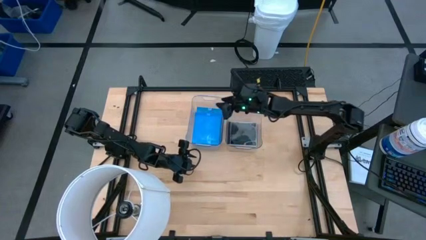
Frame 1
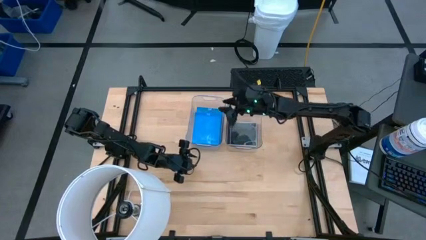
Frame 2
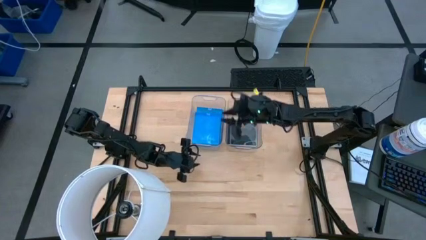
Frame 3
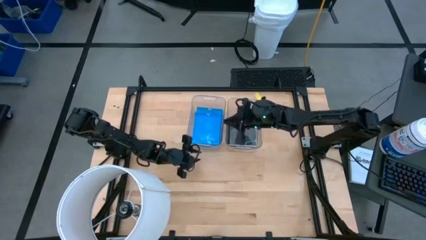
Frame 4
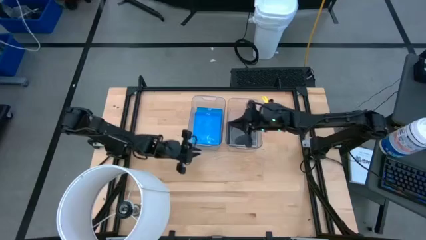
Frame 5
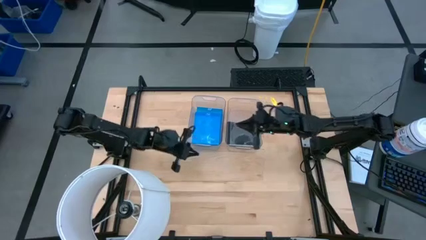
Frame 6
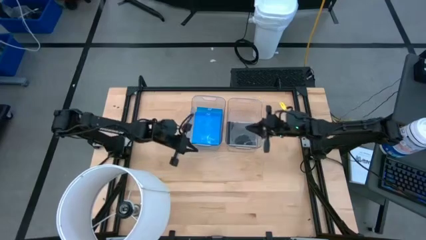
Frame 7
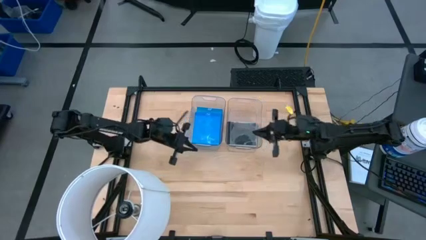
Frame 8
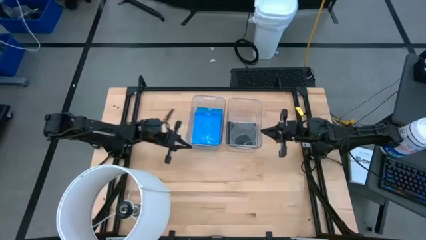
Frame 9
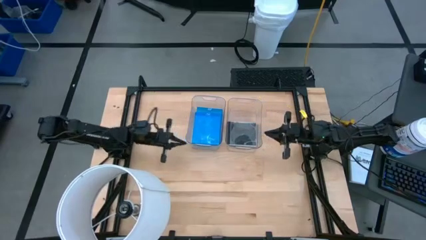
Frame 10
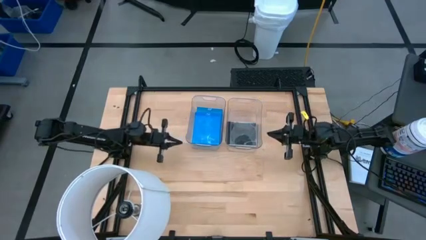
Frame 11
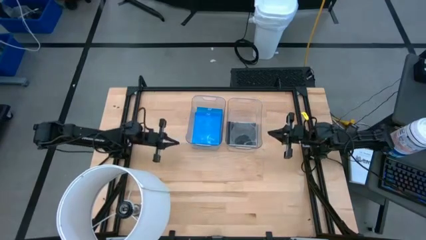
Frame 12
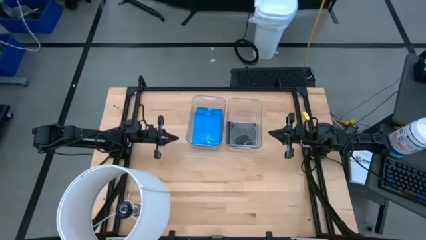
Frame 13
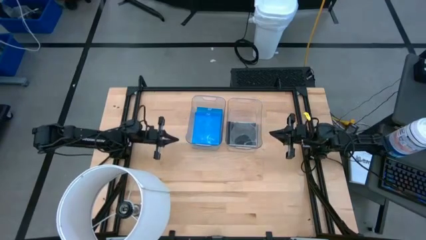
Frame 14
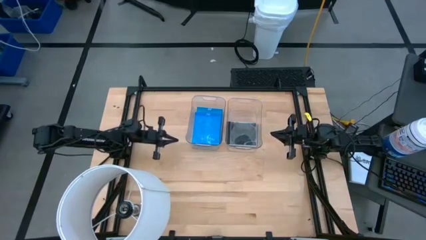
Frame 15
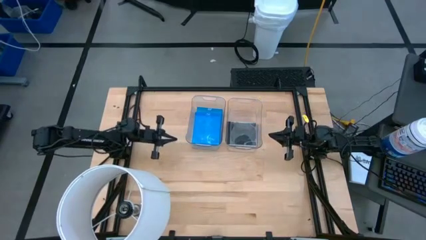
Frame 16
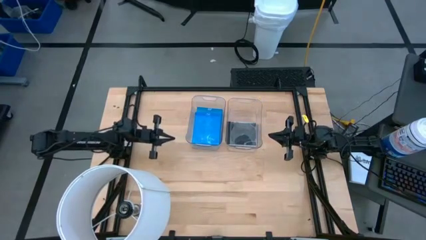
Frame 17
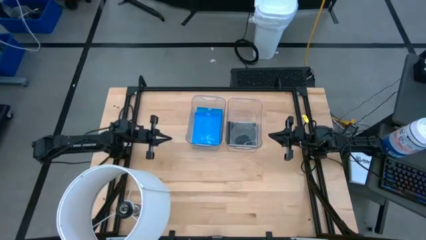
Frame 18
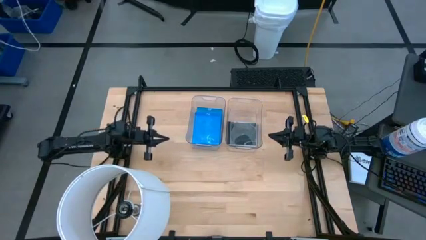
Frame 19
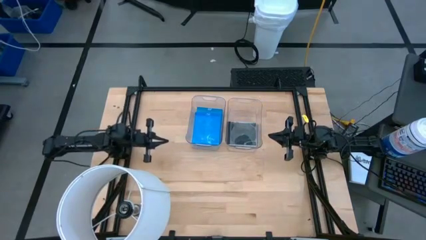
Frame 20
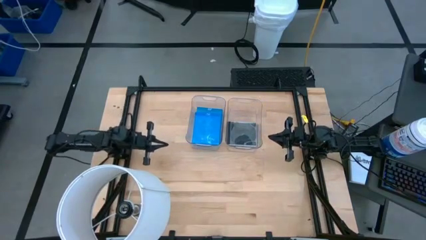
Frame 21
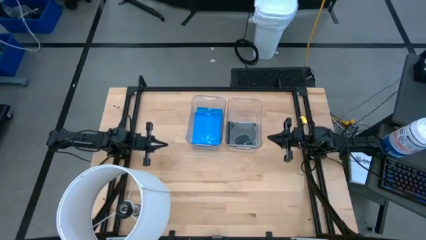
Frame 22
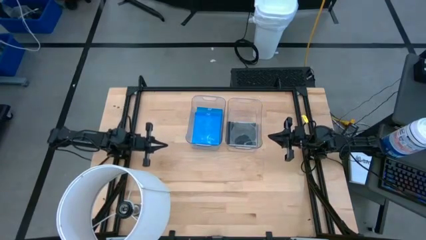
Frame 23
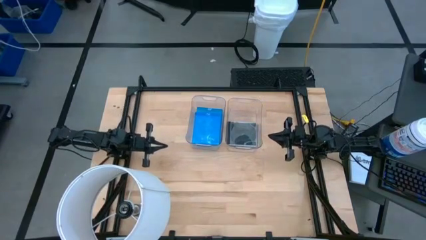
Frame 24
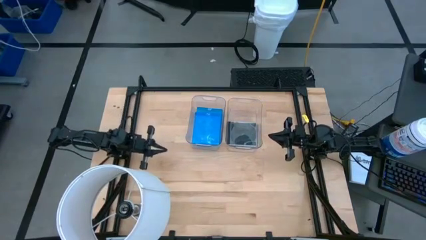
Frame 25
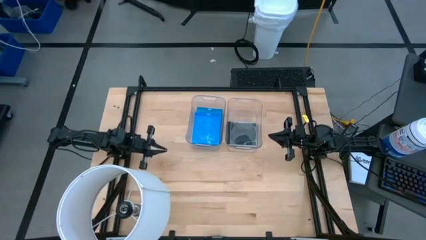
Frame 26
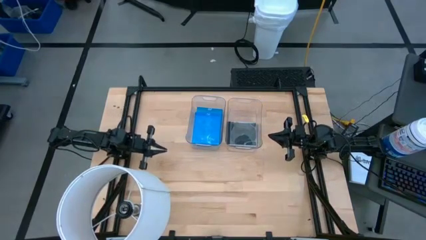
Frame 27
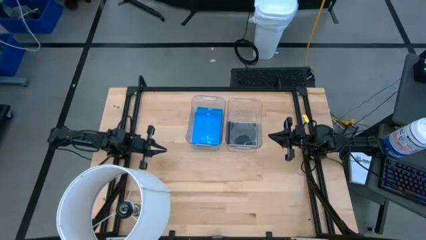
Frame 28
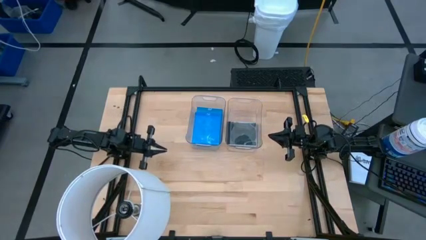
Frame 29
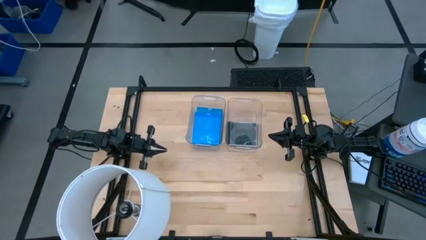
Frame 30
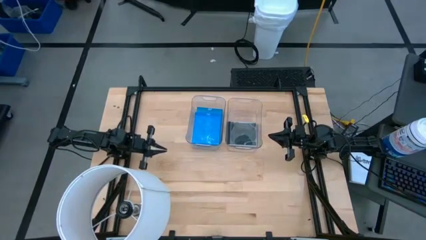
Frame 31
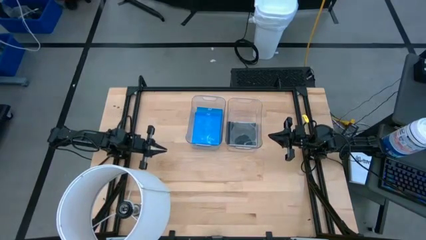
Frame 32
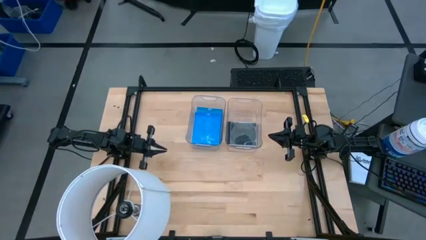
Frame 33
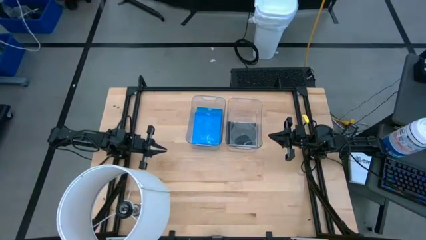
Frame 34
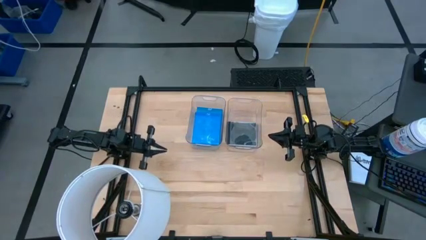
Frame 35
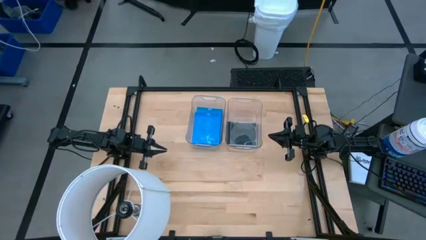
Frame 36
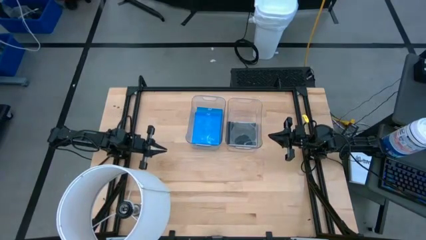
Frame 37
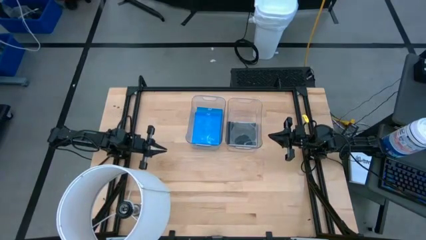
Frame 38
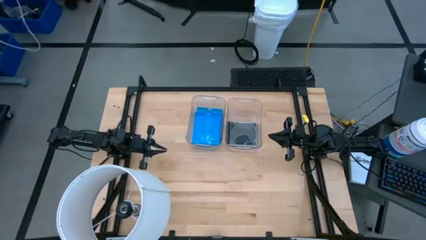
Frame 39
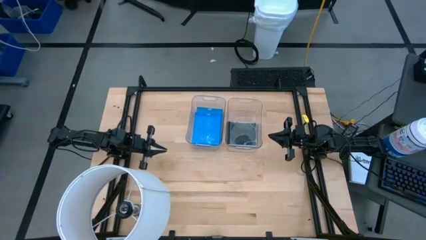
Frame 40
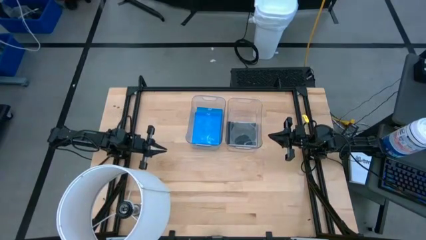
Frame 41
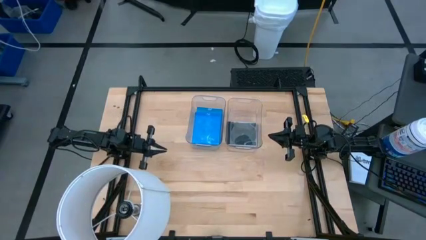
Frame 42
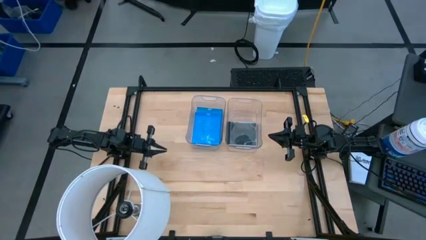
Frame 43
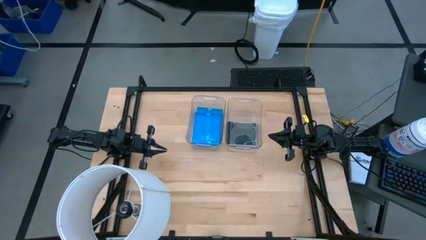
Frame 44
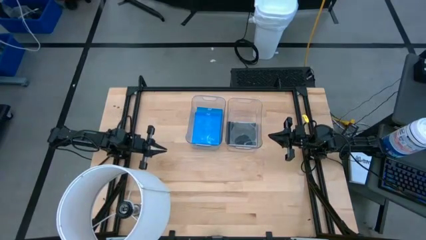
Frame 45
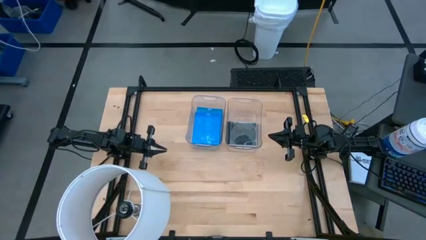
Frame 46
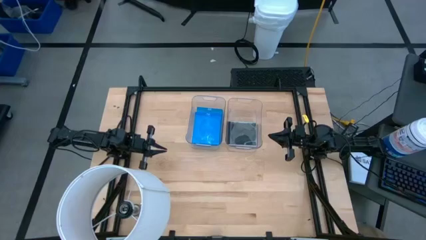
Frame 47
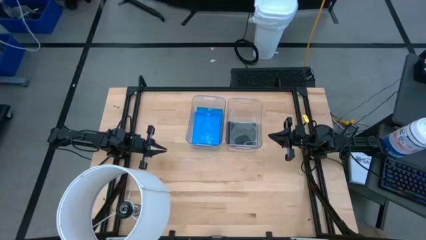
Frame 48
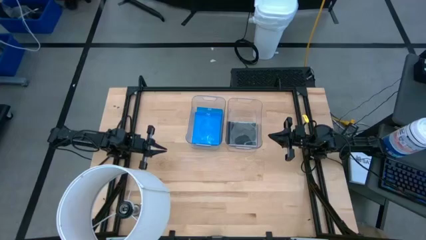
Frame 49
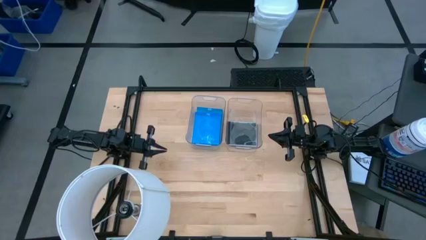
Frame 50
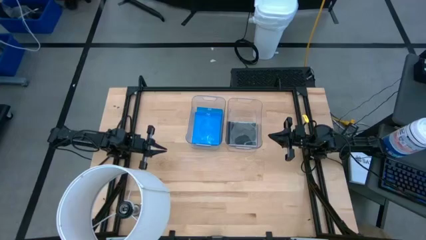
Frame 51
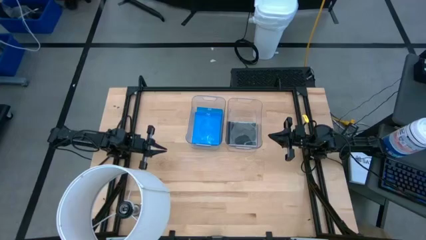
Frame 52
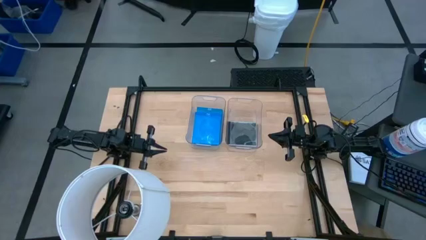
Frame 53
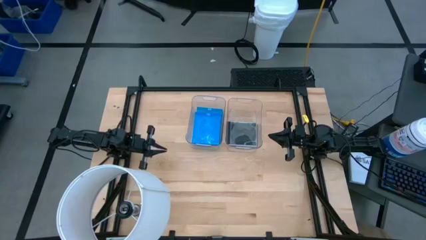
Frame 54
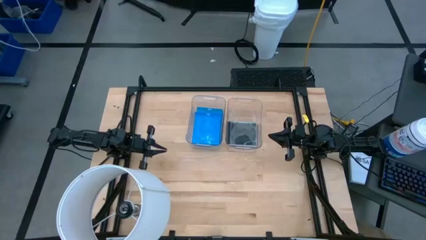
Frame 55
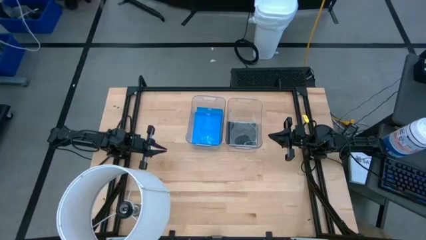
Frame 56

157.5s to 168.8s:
Task: Pick & place jewel cases by type
Return to Home Position

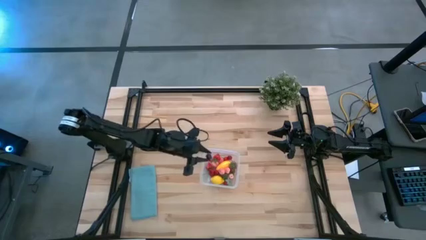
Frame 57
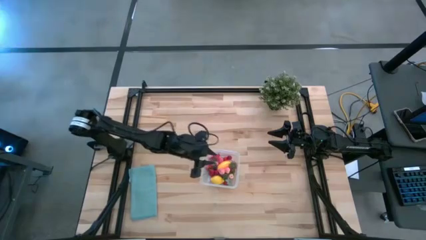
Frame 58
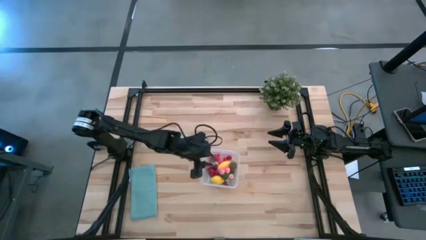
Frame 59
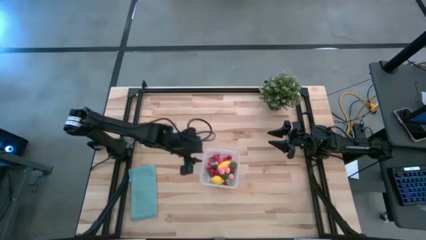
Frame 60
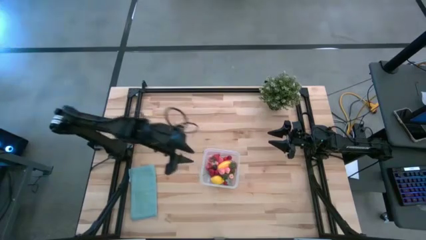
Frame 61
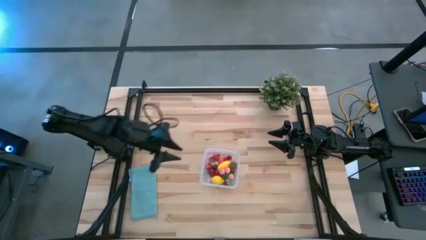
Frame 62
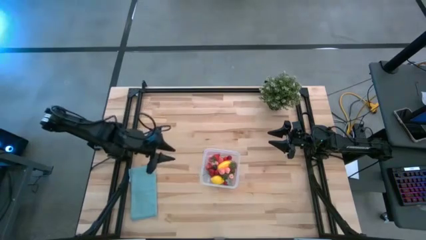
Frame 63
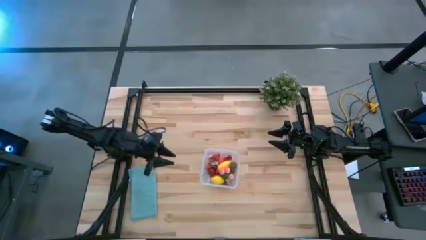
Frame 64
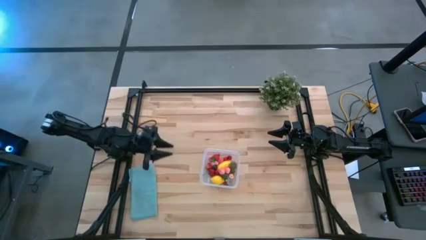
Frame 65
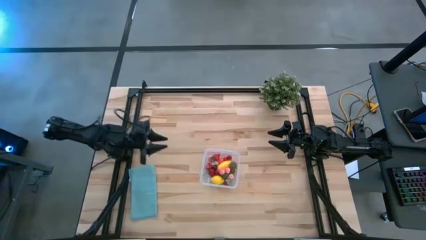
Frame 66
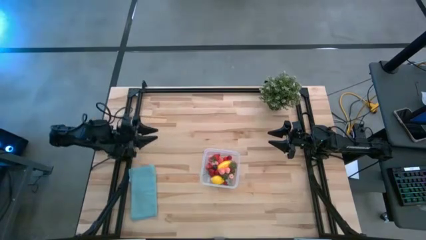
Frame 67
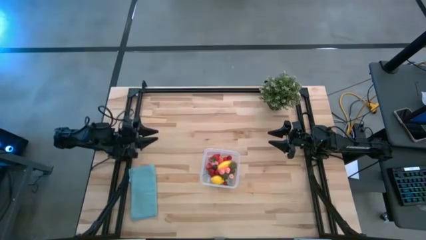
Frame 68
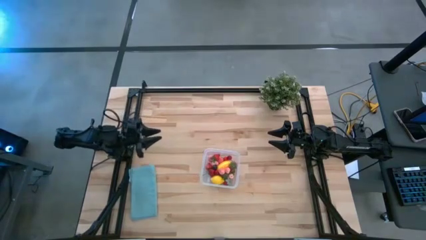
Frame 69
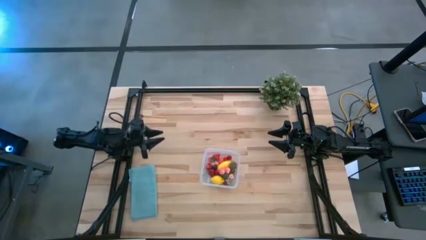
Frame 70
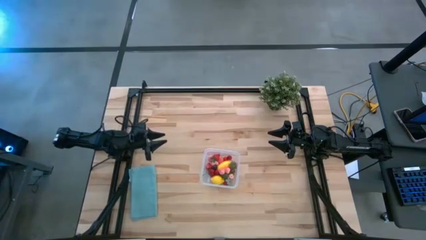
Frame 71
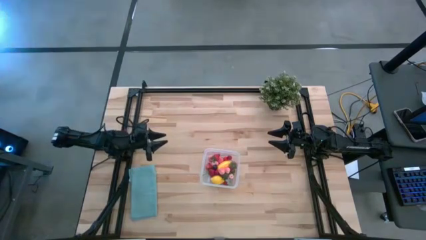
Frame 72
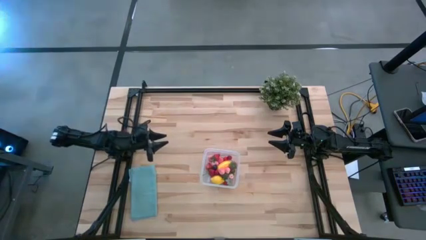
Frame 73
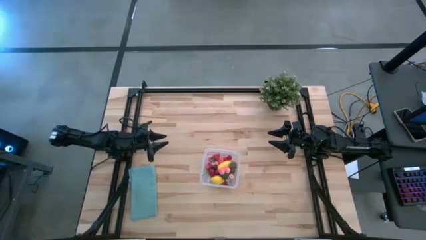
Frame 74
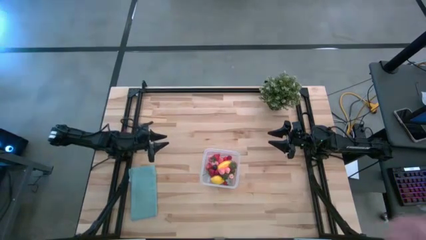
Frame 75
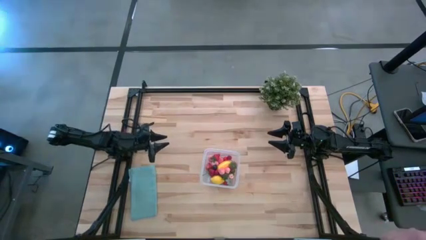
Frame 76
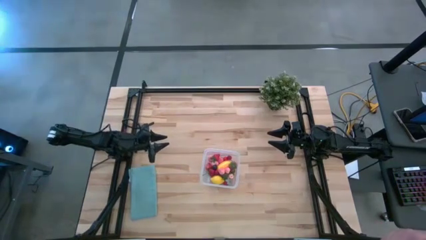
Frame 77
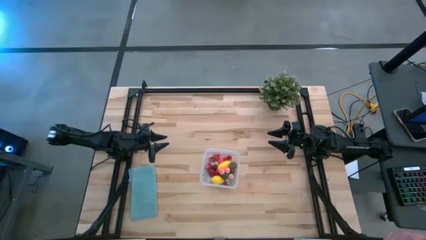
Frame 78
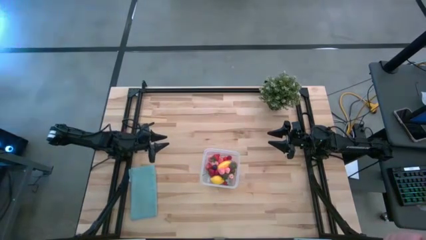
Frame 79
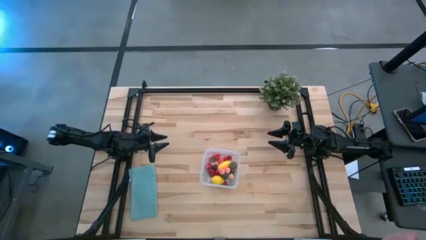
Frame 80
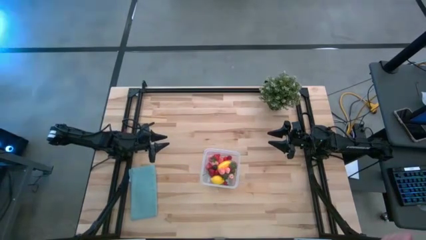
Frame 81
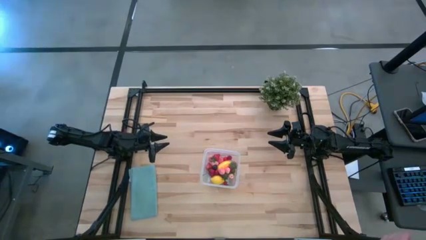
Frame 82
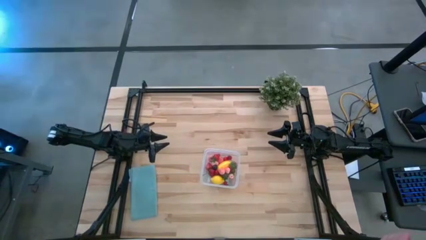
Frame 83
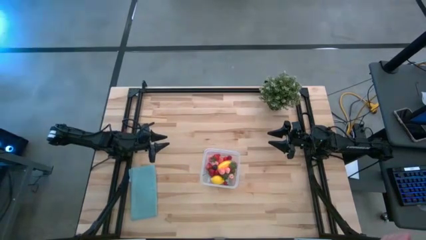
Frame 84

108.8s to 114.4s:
Task: Pick and placing Produce into tupperware
Return to Home Position
